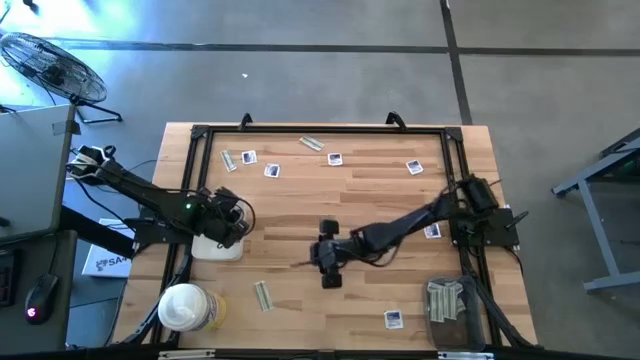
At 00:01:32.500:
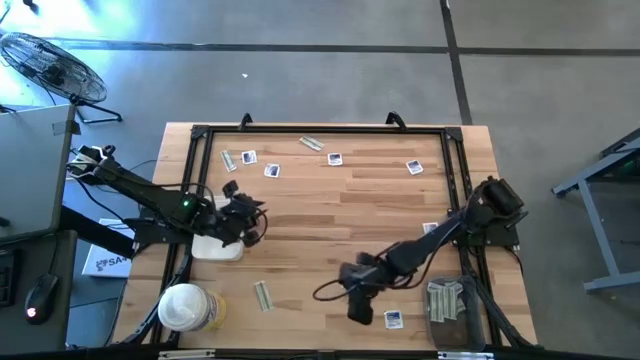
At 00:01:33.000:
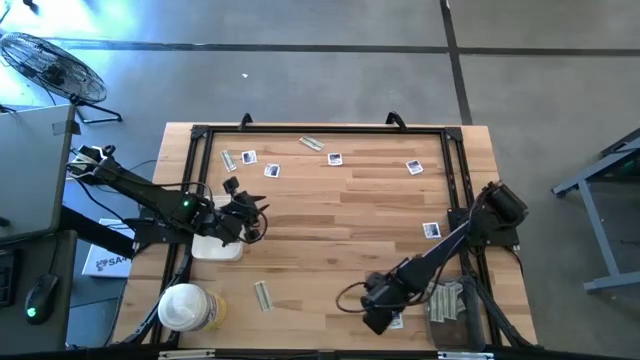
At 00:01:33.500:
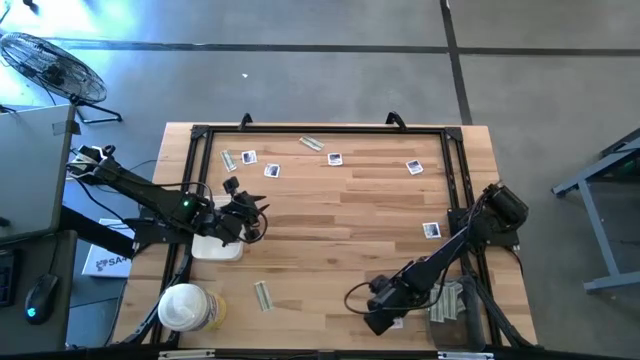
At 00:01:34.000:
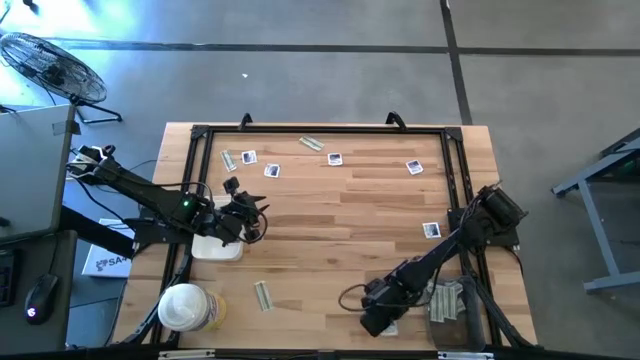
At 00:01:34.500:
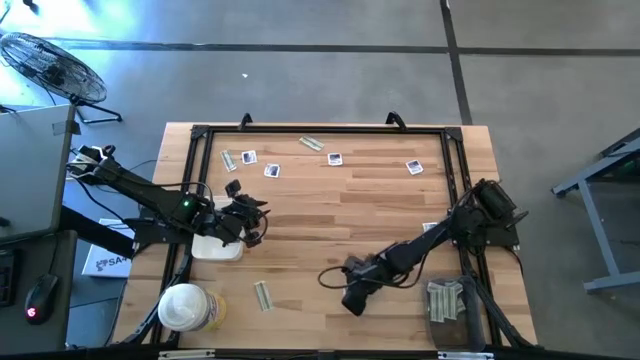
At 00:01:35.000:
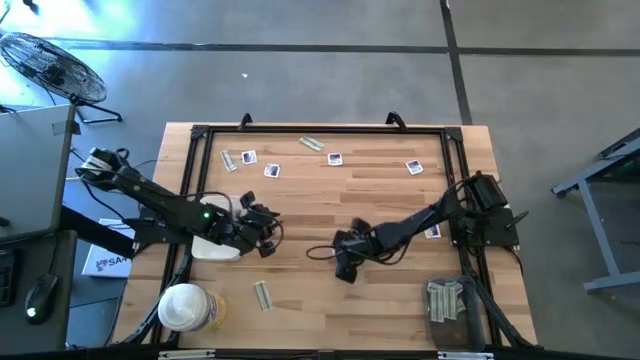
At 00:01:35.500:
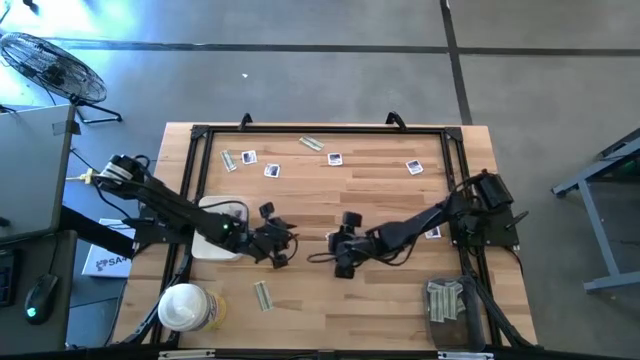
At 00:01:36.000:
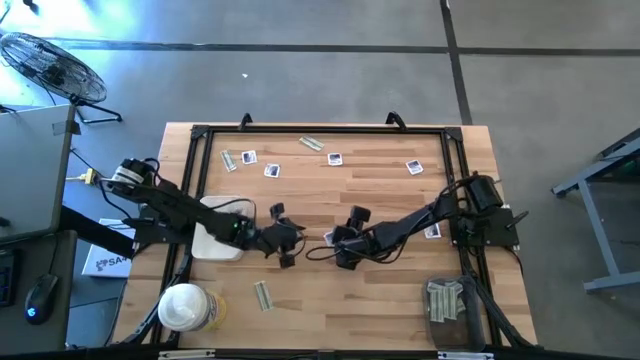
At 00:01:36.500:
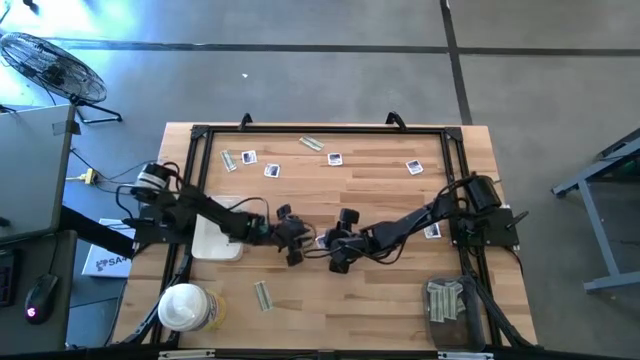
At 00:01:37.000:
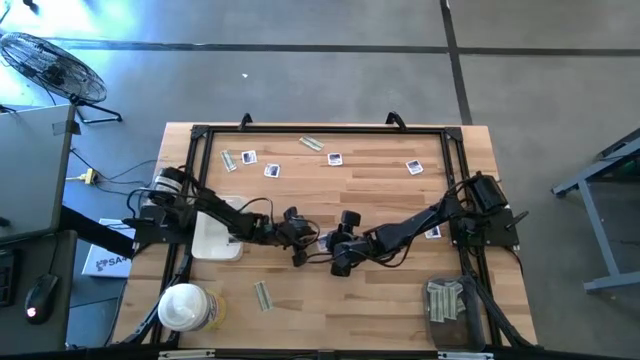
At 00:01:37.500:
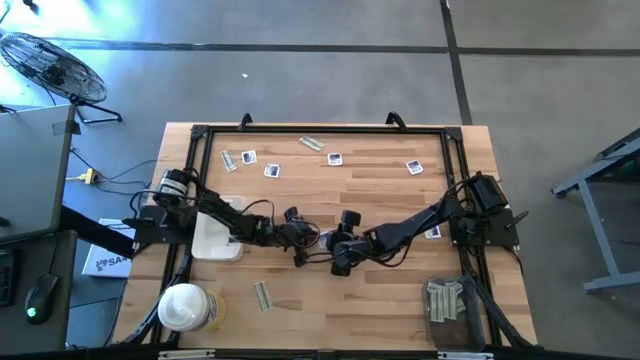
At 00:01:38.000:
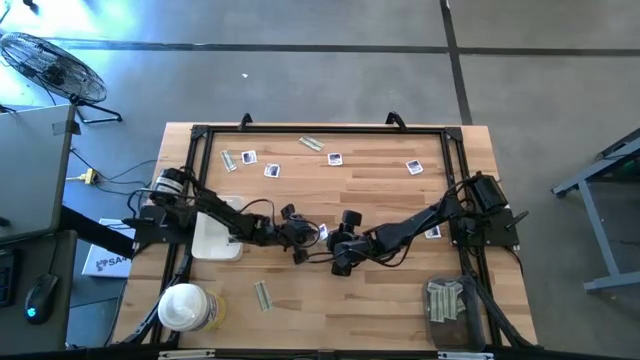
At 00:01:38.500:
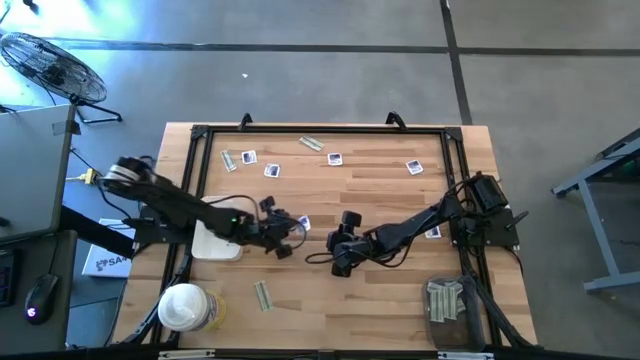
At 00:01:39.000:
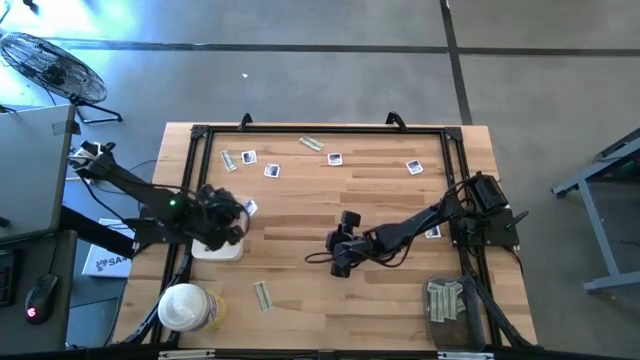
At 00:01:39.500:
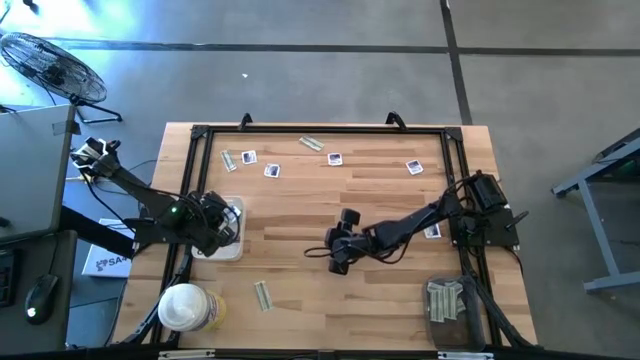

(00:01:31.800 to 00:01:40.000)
Task: Pick & Place First Aid Supplies
Put the blue alcohol pad into the white bin

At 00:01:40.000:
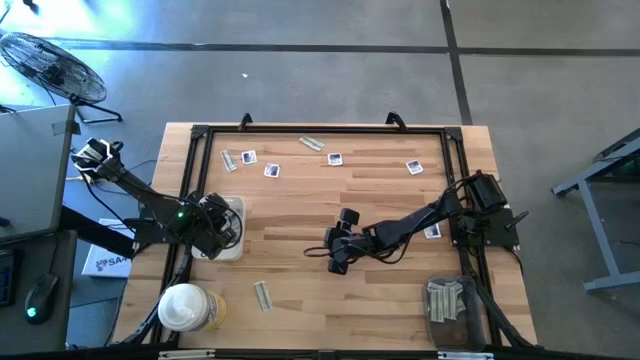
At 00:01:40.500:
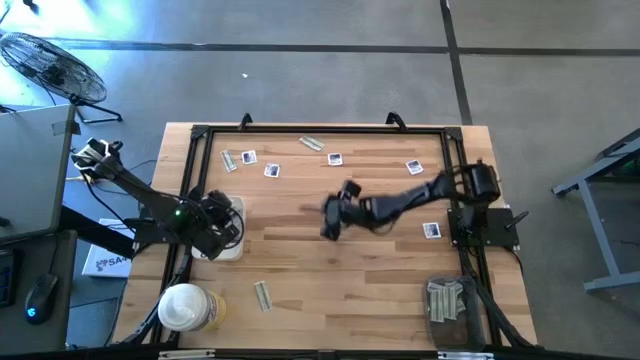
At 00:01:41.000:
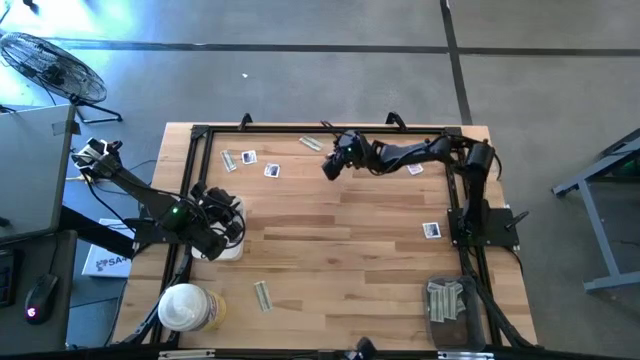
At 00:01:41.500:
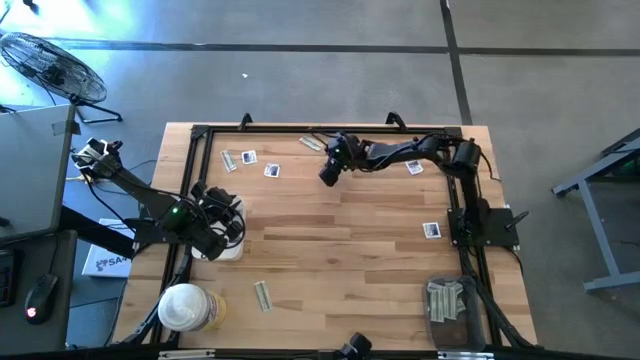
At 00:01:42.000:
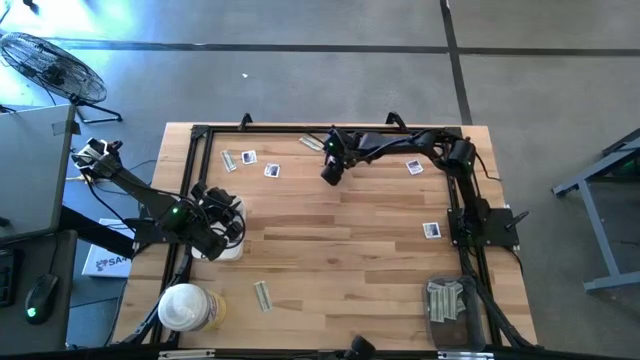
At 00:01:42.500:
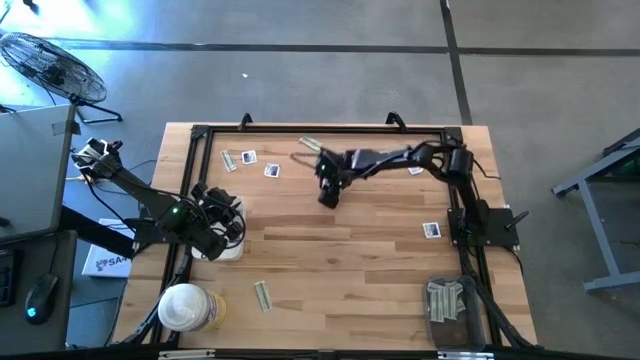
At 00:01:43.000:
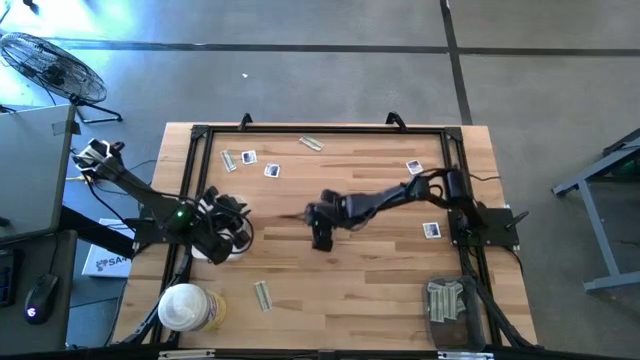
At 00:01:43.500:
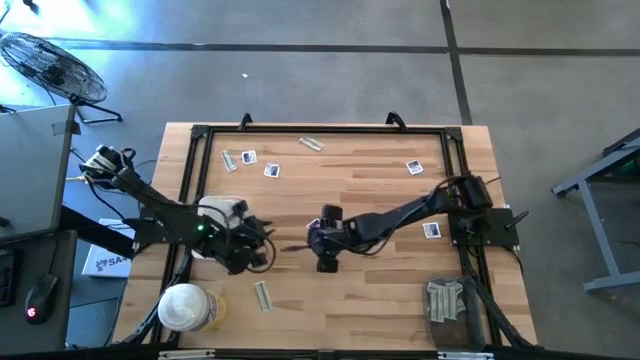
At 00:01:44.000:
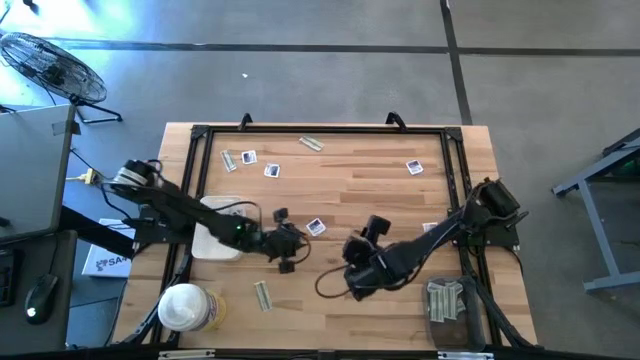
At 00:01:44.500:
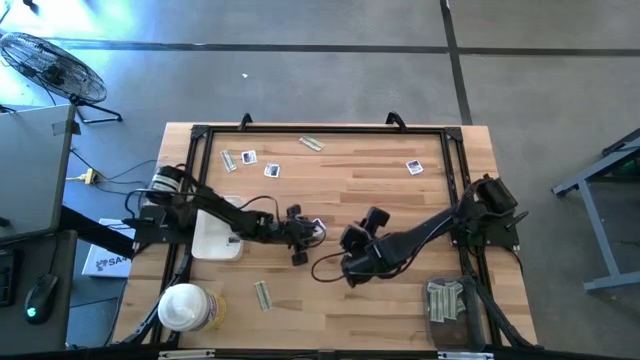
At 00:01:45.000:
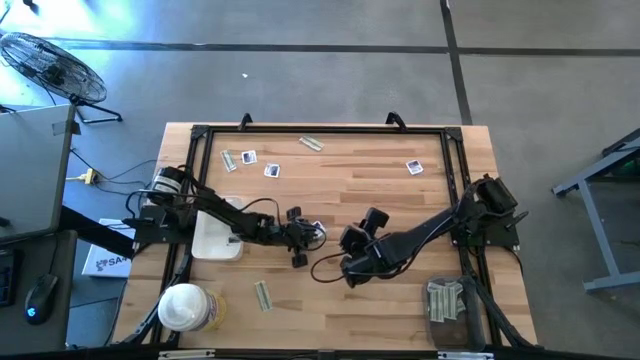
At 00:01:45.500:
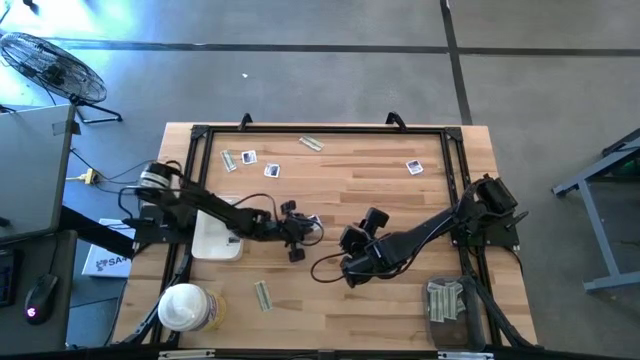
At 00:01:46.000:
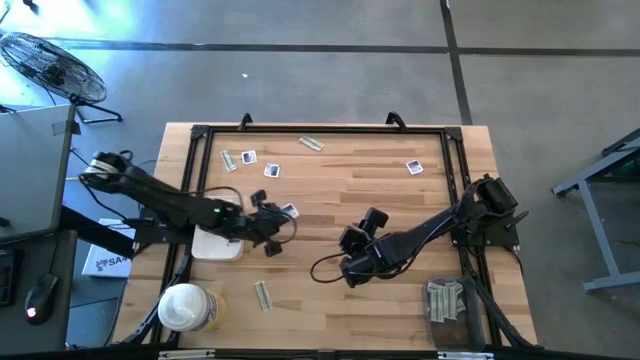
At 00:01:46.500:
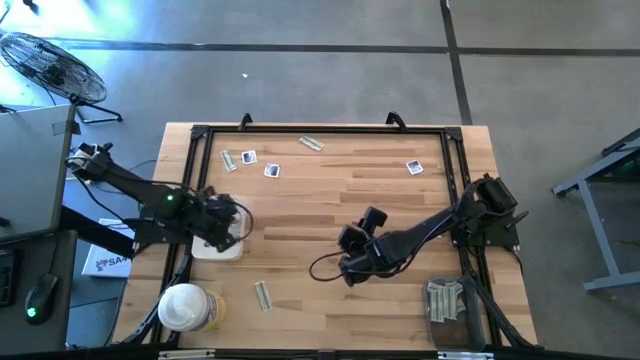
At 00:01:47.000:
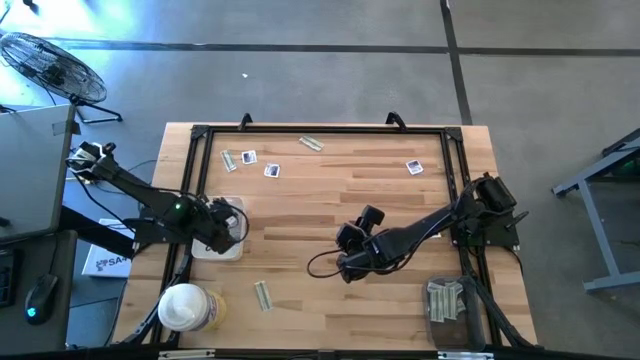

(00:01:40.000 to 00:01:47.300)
Put the blue alcohol pad into the white bin

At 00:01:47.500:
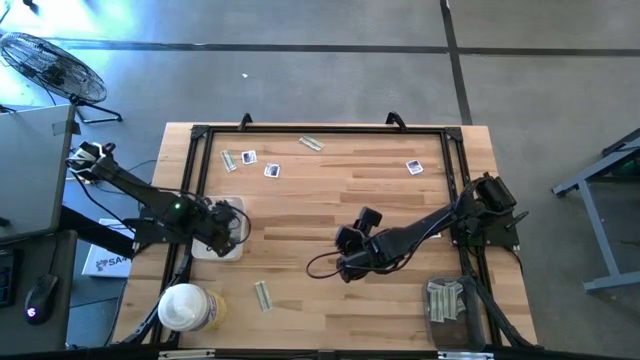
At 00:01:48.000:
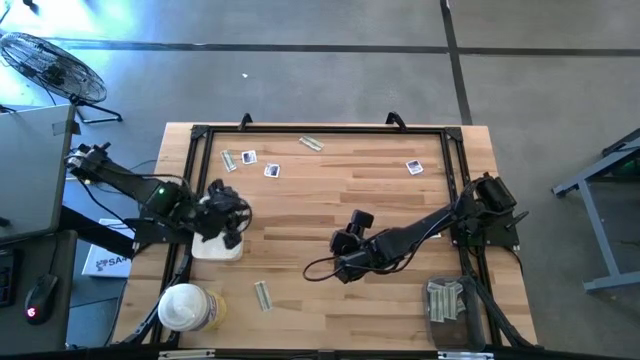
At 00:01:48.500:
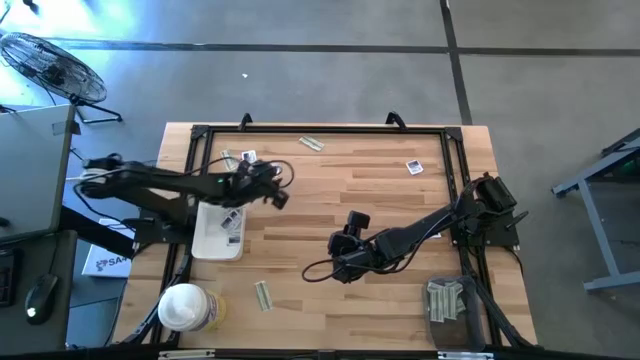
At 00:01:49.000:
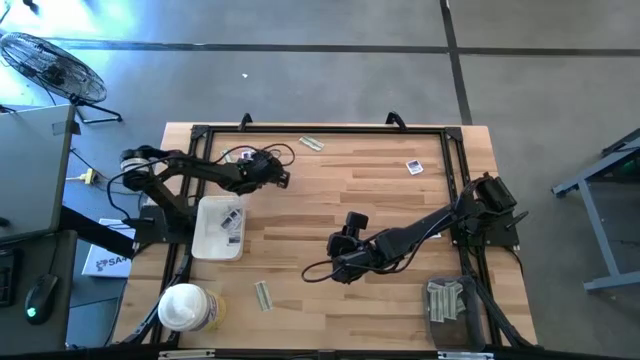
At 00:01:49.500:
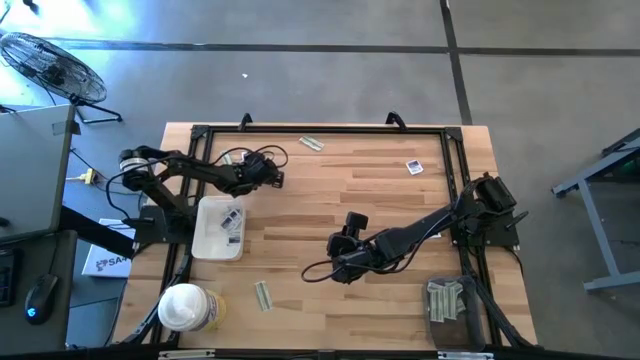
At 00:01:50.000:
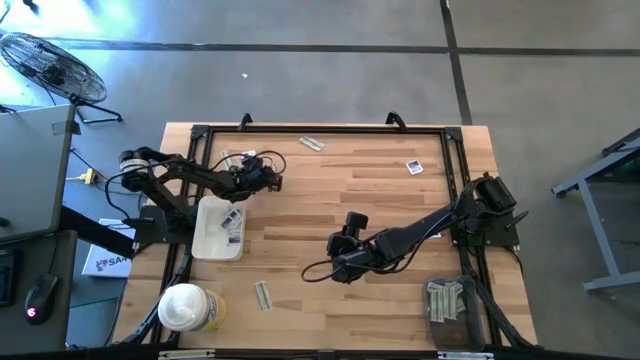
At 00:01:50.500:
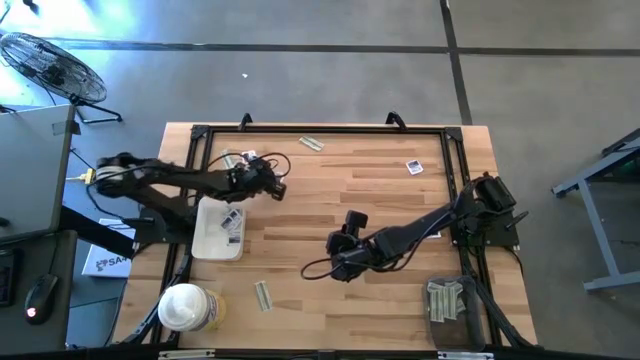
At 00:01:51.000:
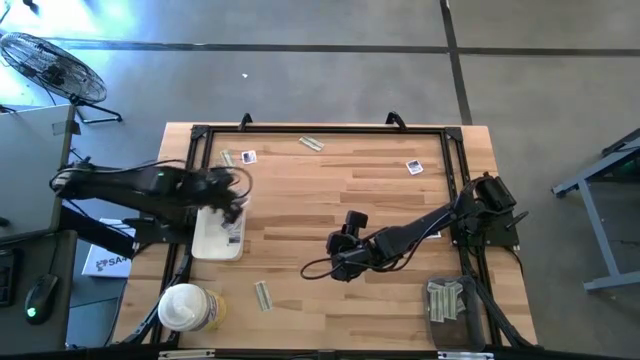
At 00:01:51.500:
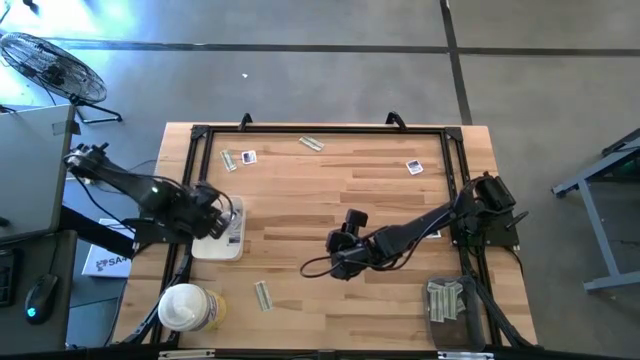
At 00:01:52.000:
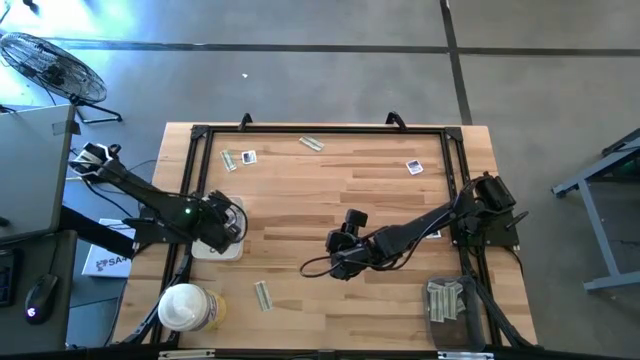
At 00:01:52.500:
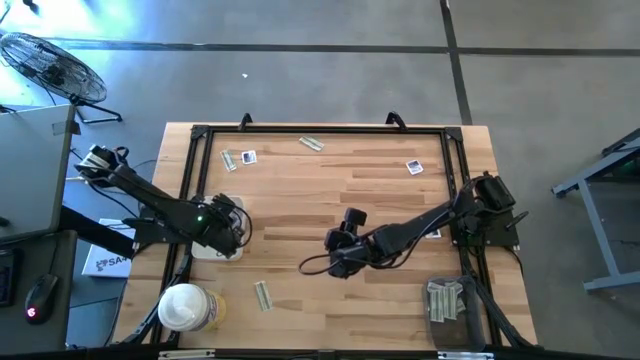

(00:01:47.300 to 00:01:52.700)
Put the blue alcohol pad into the white bin

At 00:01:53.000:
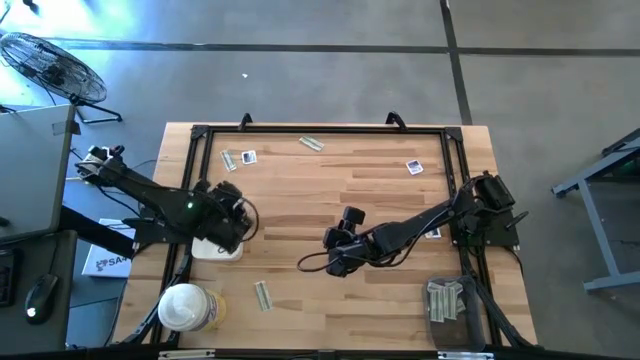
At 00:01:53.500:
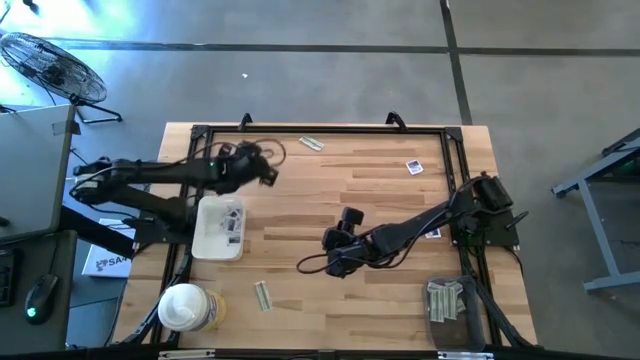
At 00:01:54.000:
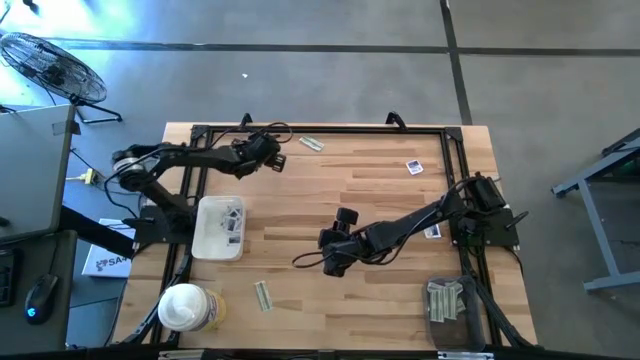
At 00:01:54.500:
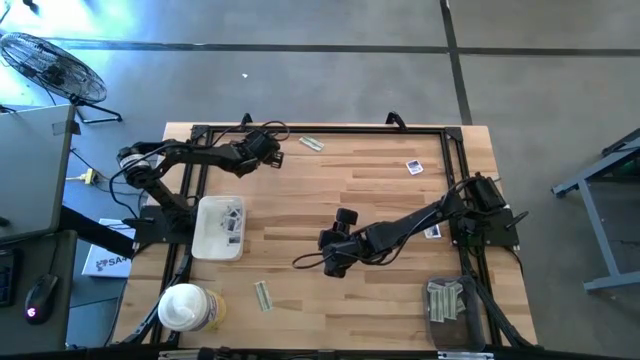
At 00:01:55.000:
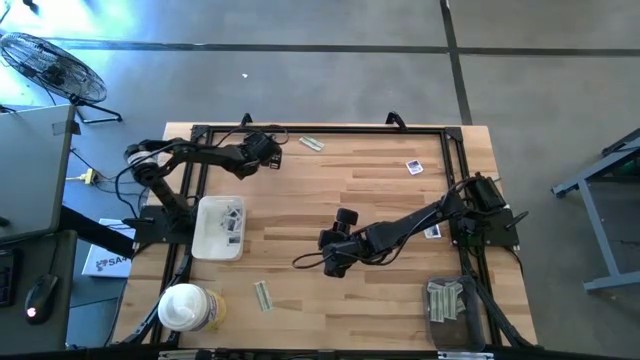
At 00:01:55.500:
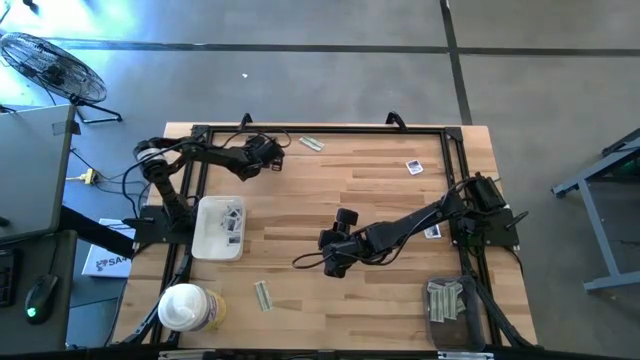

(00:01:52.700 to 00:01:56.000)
Put the blue alcohol pad into the white bin
